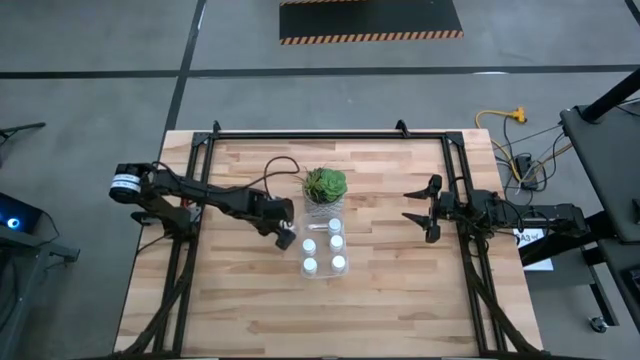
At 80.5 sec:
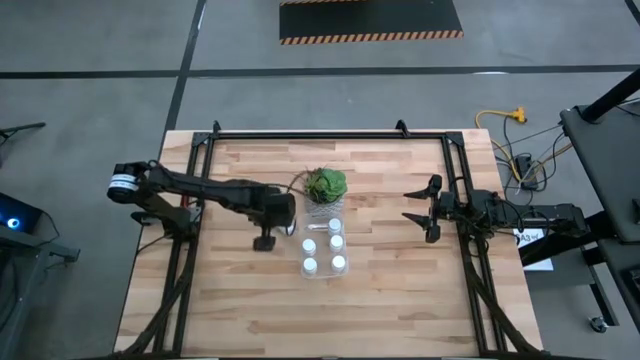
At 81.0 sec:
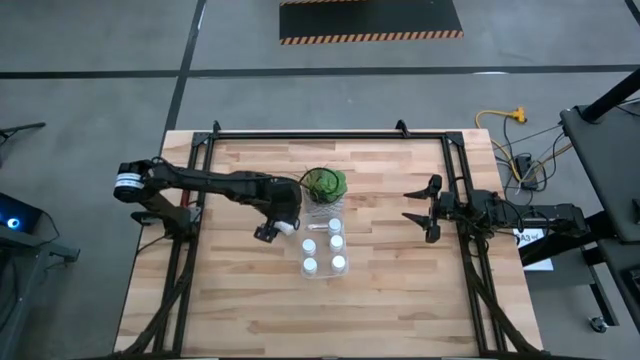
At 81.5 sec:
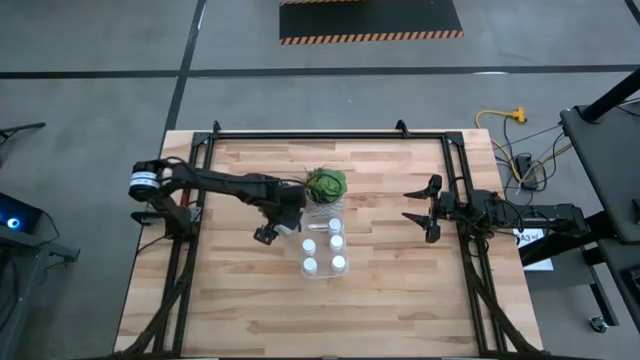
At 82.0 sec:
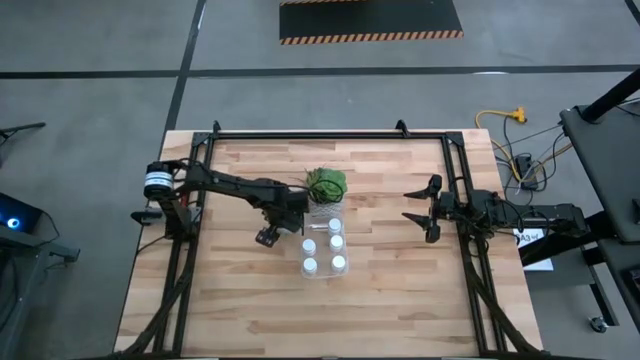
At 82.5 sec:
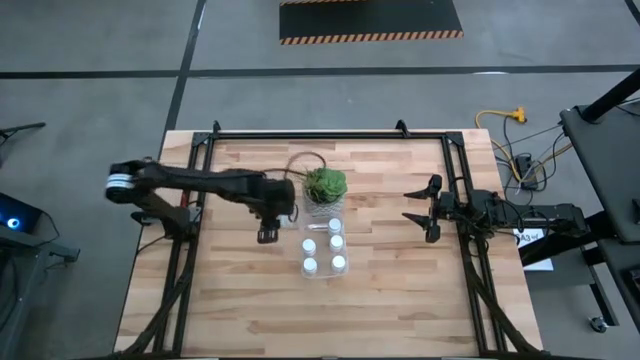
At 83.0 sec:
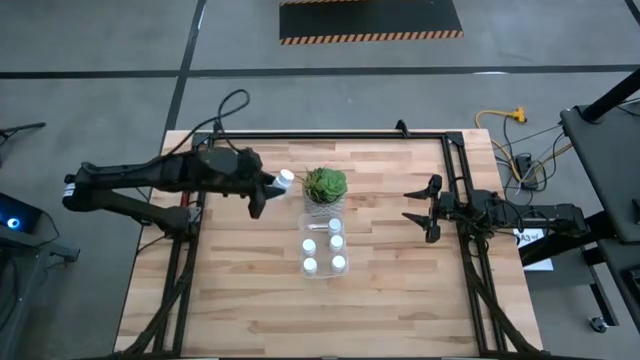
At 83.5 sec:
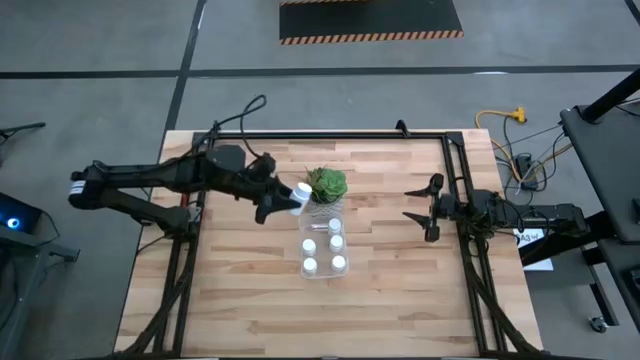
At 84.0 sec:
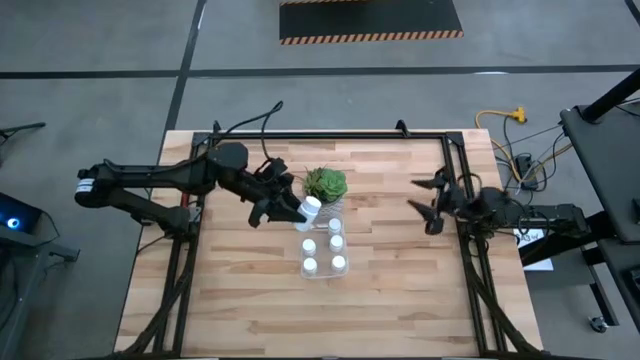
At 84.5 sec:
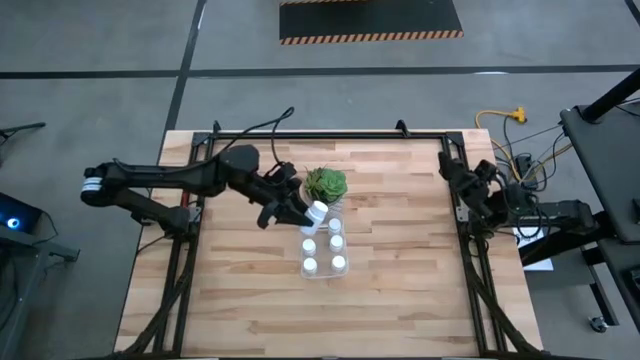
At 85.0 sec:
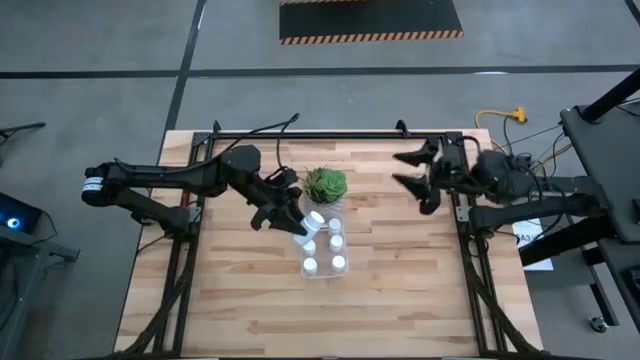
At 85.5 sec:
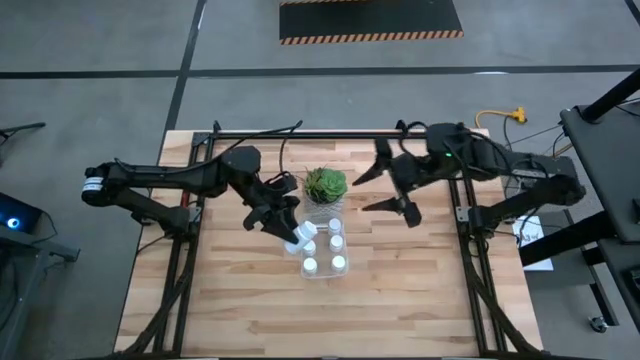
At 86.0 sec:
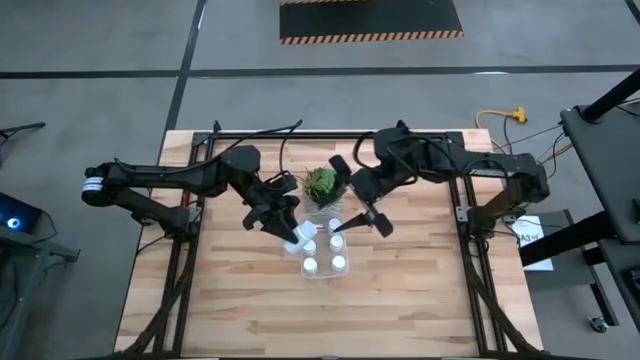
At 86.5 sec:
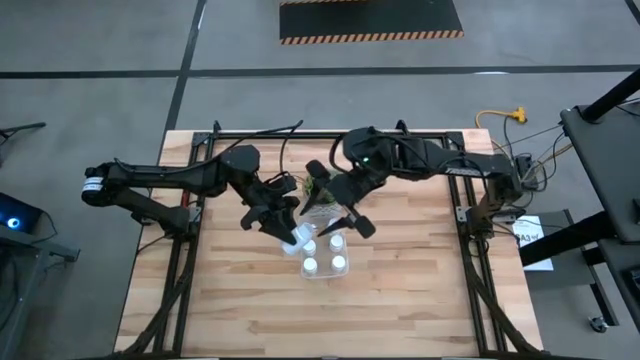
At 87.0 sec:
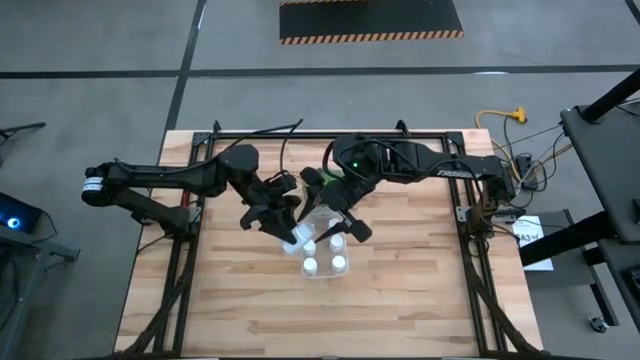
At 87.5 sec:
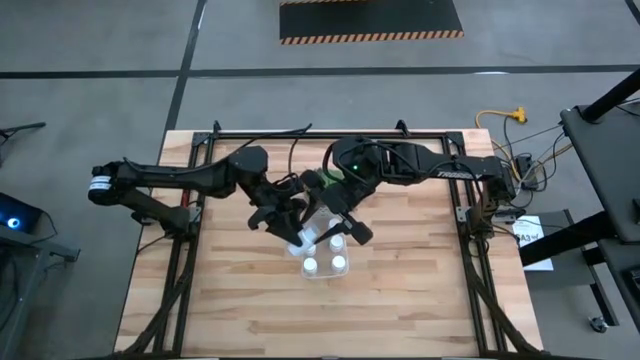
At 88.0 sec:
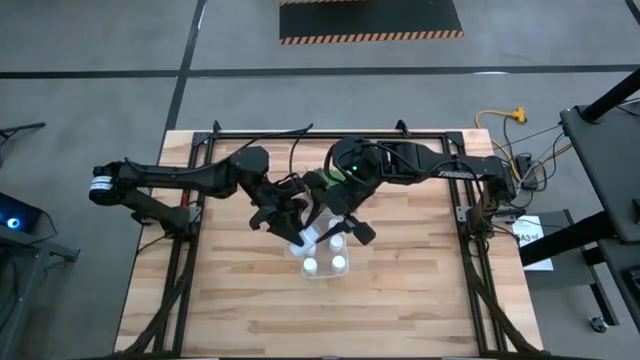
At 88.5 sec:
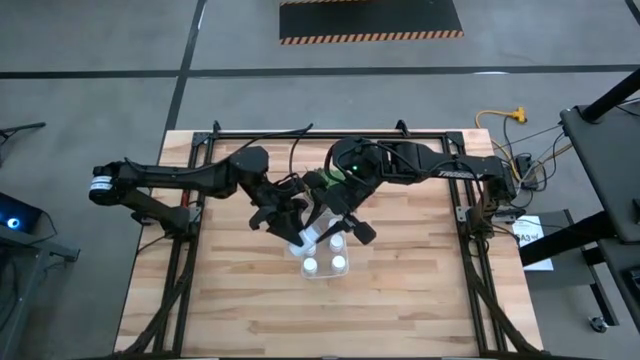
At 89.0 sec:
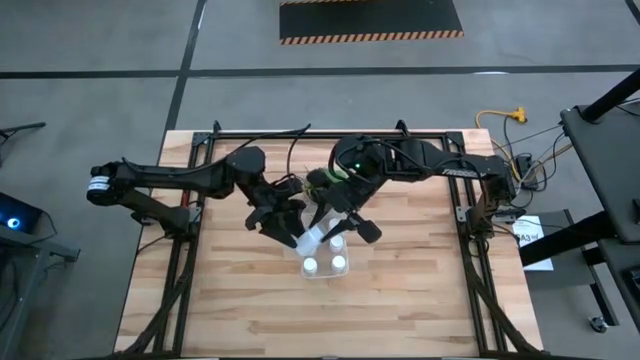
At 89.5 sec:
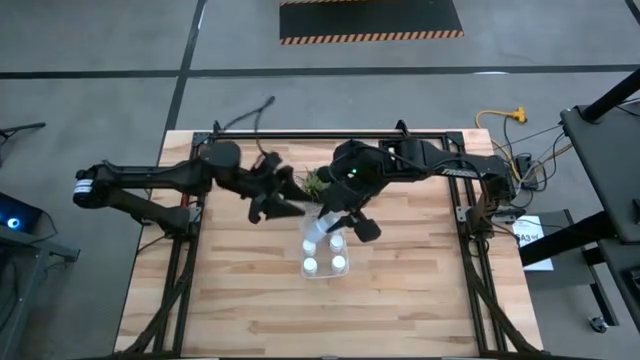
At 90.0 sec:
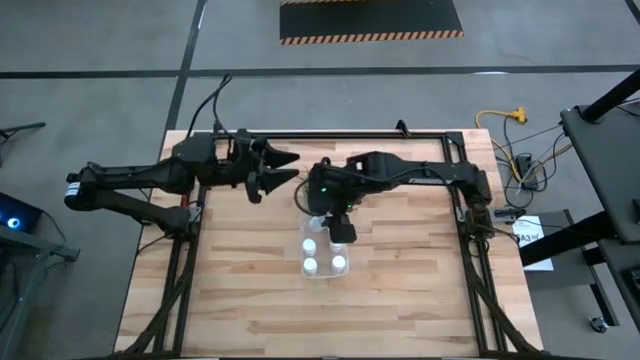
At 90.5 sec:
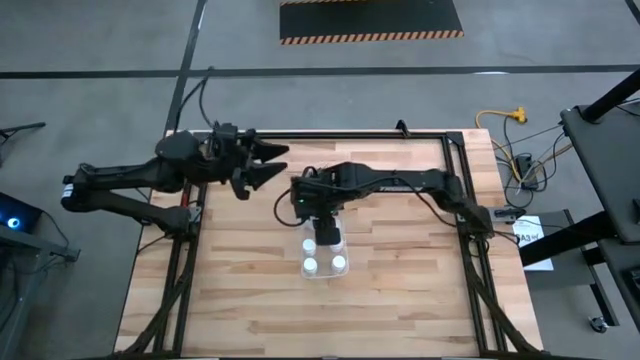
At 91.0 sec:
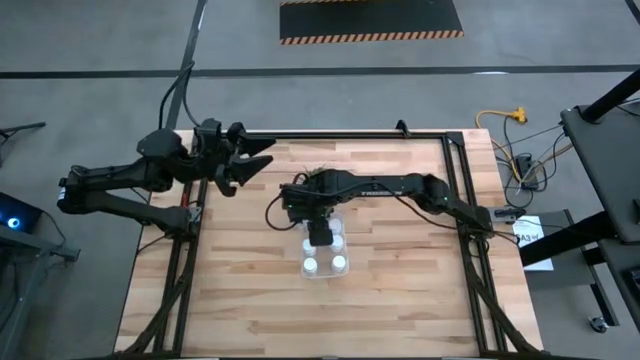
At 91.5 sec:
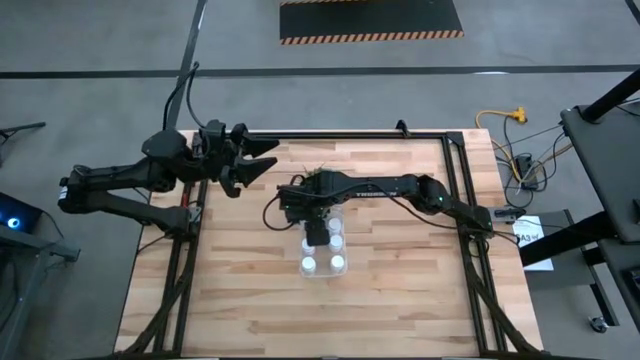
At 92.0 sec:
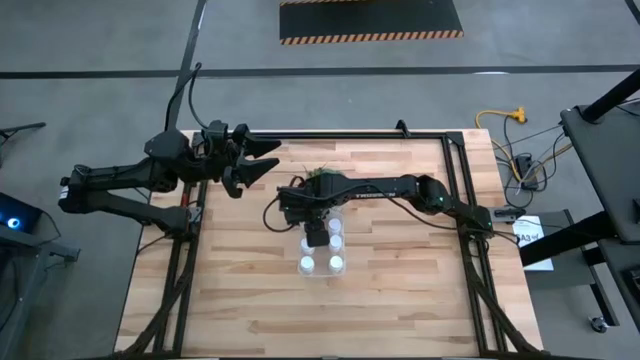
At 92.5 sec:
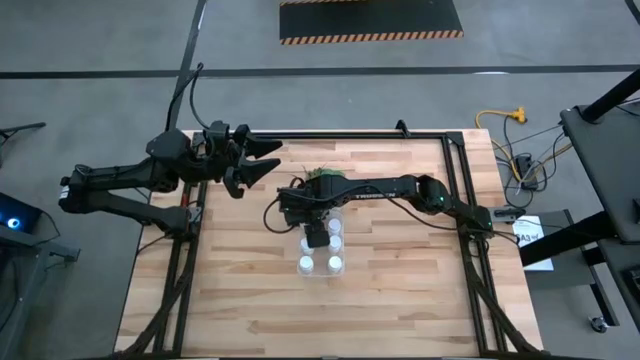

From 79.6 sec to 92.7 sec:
Task: Pick and place pill bottles into a basket
Put the pill bottle into the bin

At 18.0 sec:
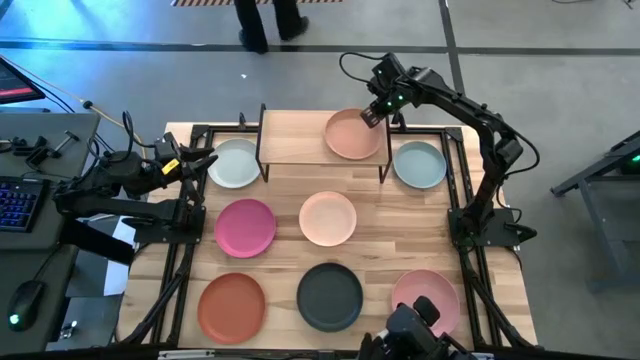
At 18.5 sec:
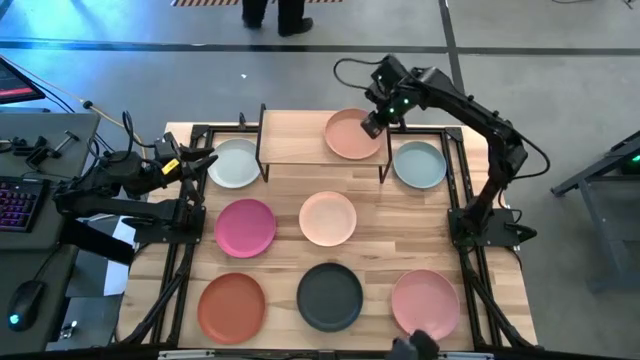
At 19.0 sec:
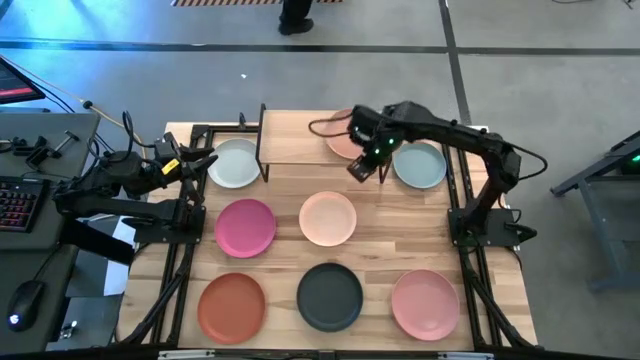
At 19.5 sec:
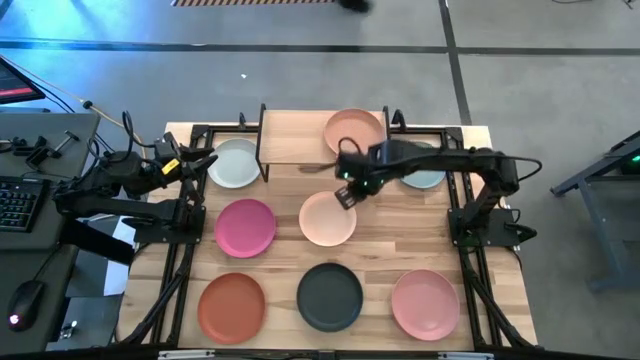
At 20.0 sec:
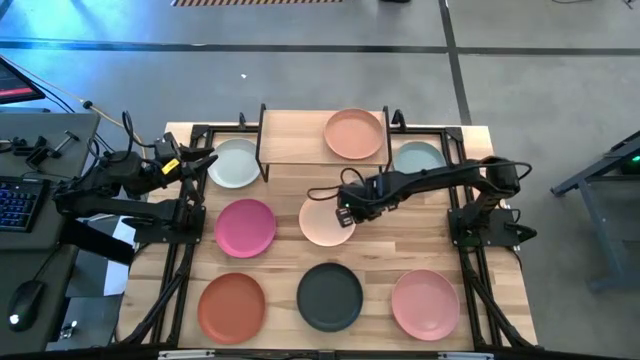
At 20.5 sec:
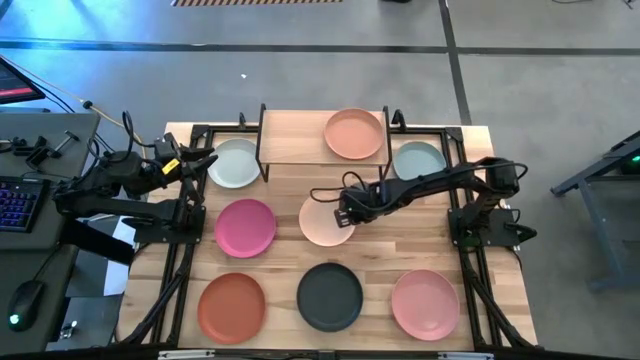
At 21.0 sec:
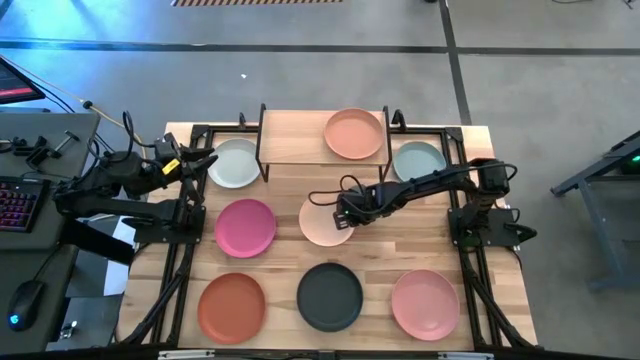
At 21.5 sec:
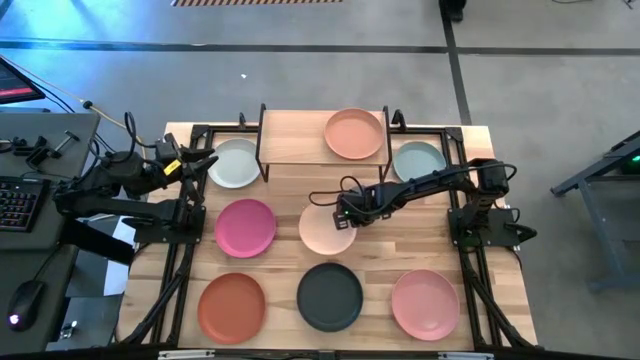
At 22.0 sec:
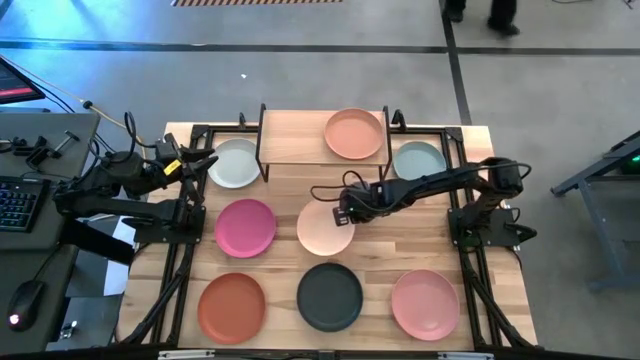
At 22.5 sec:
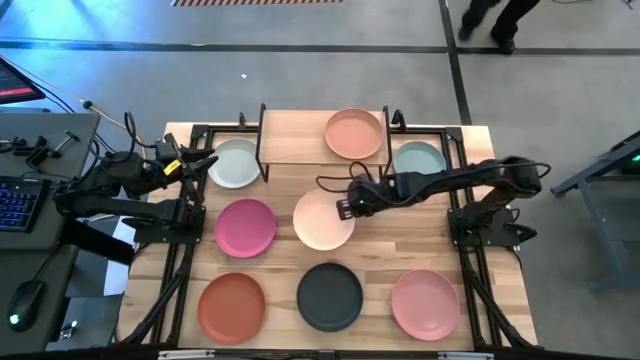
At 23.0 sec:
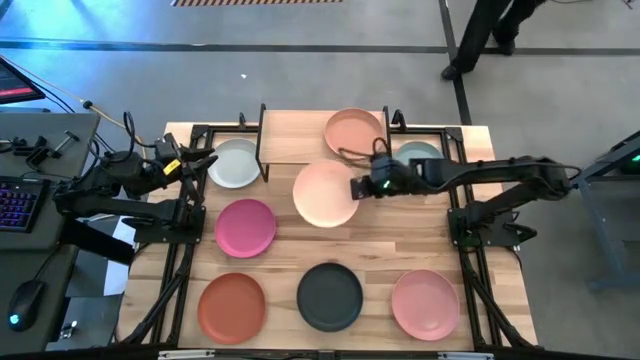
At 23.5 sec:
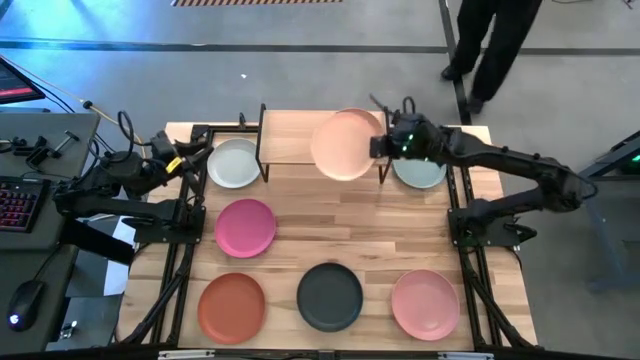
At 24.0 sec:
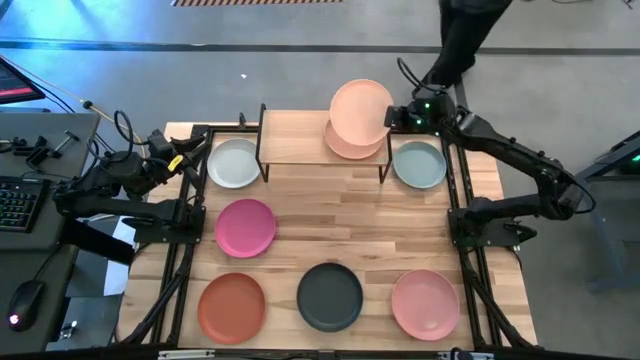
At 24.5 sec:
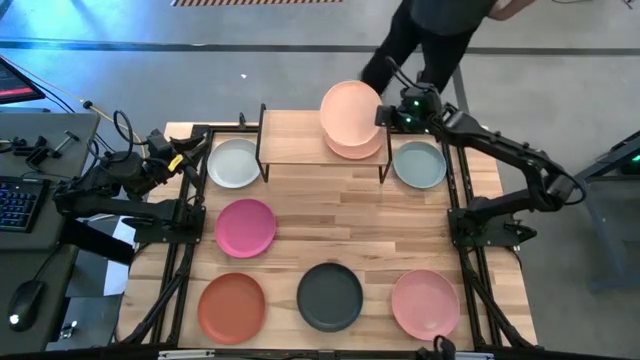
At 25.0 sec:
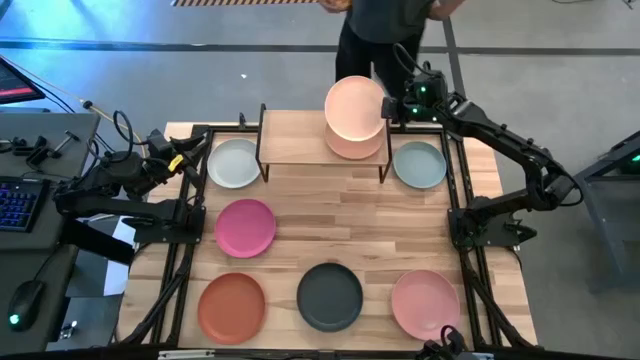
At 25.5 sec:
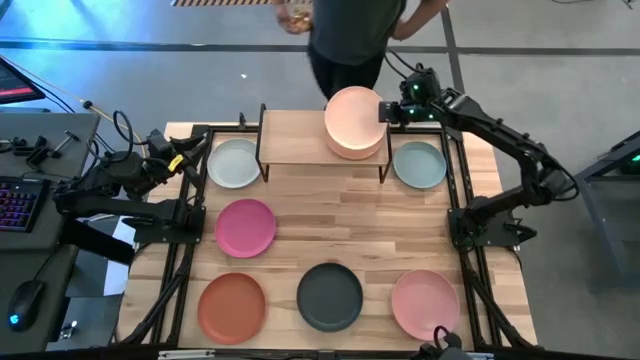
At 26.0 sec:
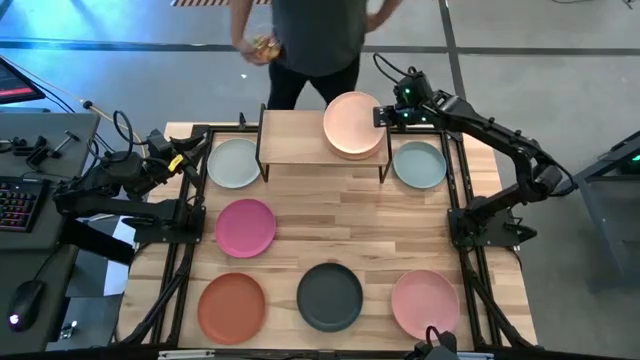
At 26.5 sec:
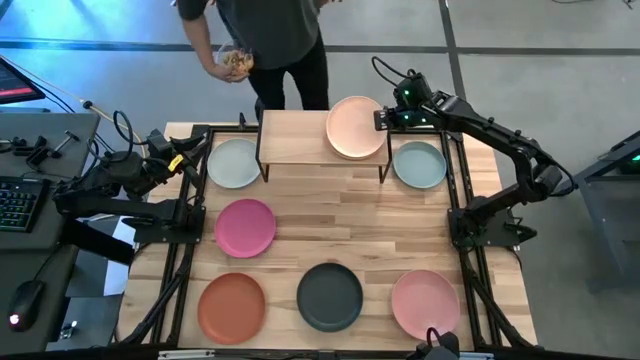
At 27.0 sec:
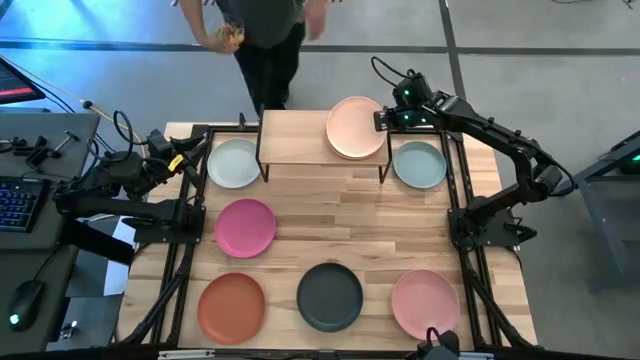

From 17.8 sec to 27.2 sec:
Task: Place and stack plates onto a shelf
Stack the light orange plate on top of the brown plate on the shelf
